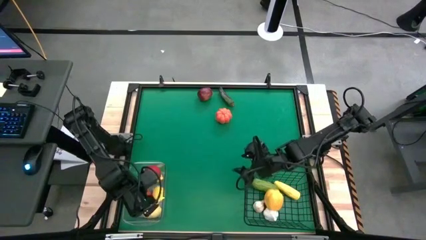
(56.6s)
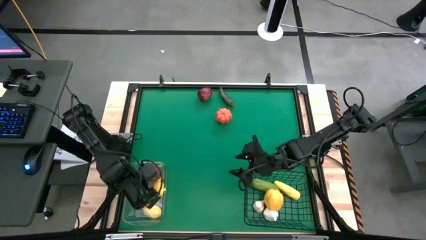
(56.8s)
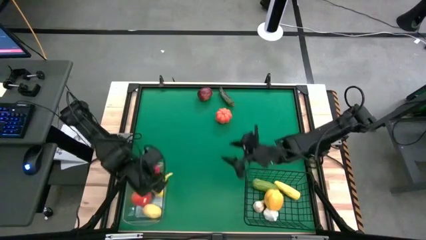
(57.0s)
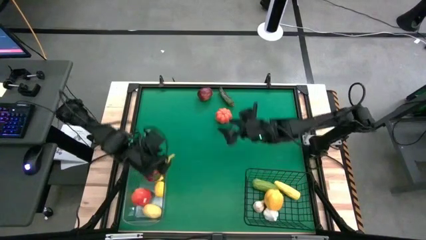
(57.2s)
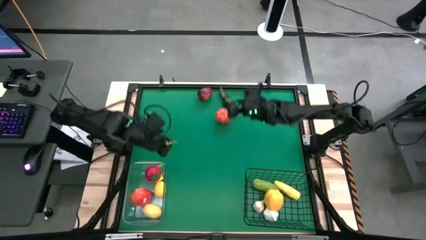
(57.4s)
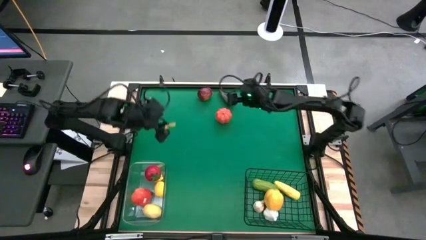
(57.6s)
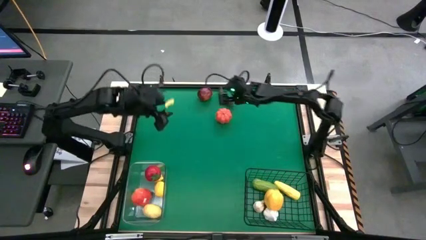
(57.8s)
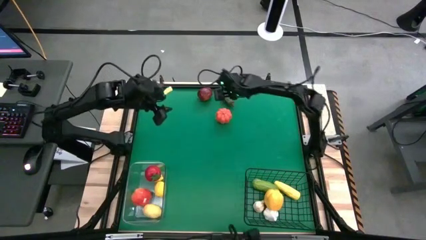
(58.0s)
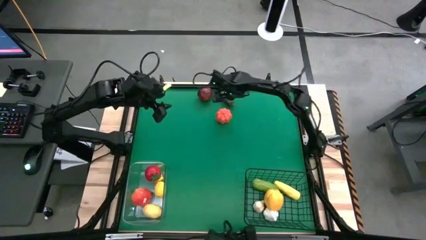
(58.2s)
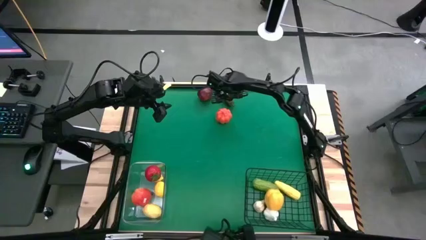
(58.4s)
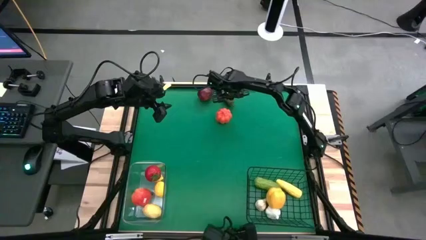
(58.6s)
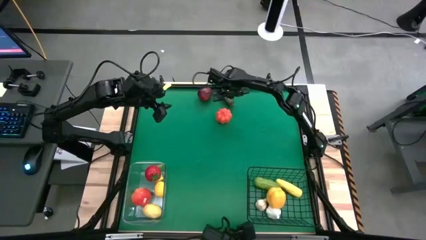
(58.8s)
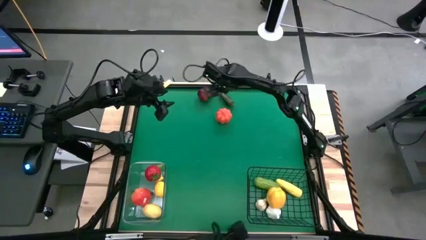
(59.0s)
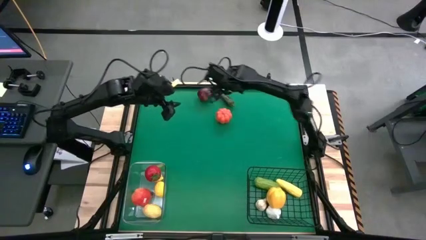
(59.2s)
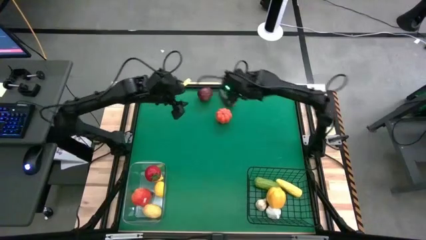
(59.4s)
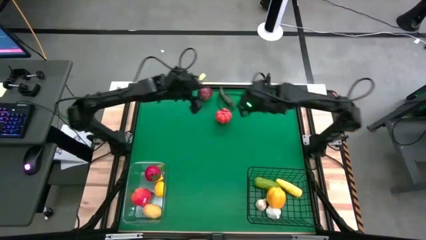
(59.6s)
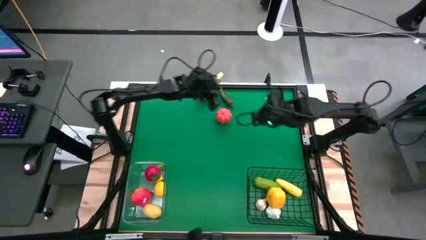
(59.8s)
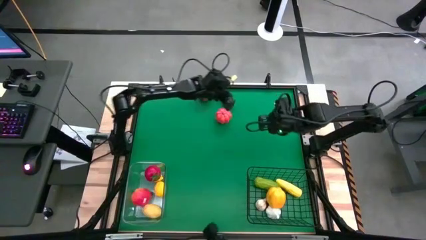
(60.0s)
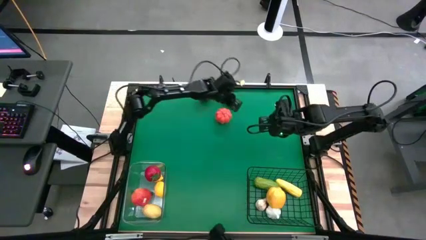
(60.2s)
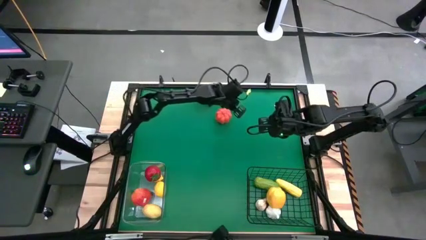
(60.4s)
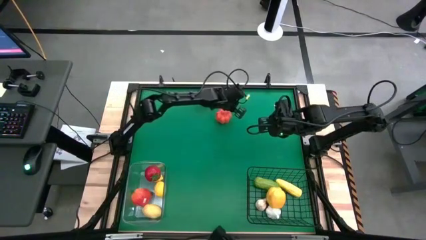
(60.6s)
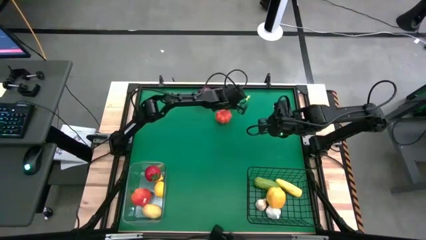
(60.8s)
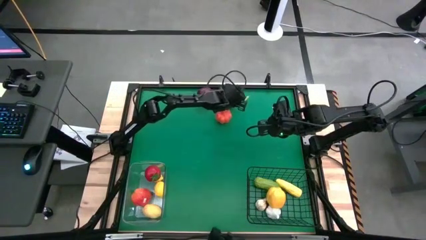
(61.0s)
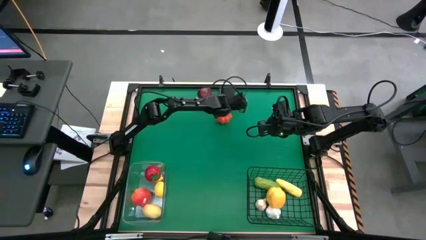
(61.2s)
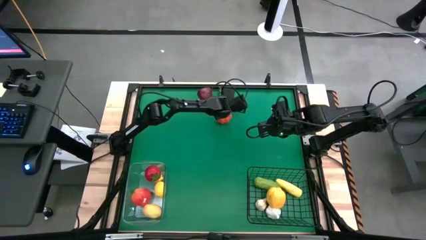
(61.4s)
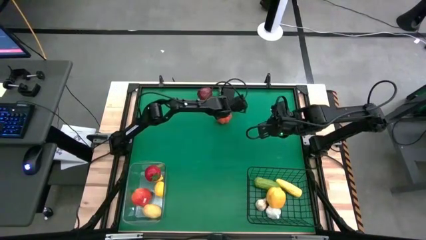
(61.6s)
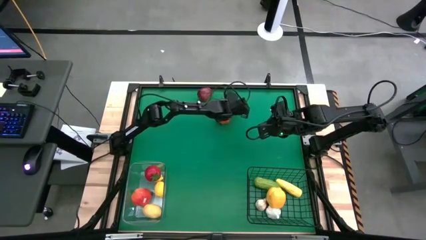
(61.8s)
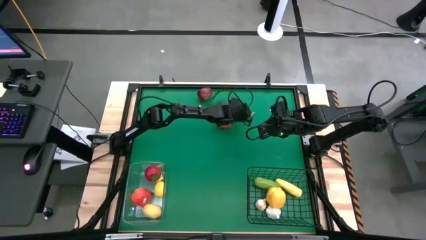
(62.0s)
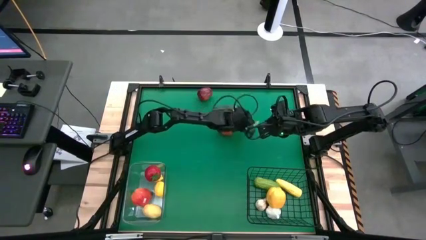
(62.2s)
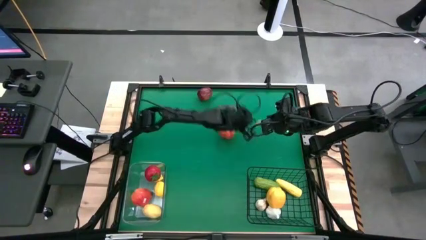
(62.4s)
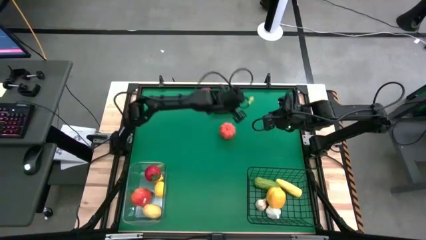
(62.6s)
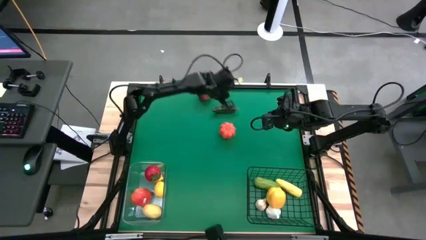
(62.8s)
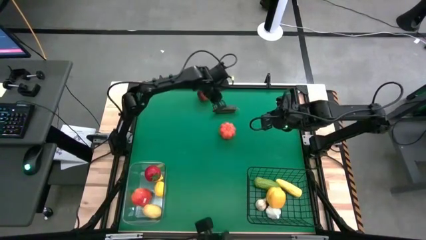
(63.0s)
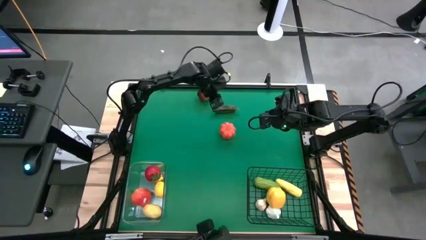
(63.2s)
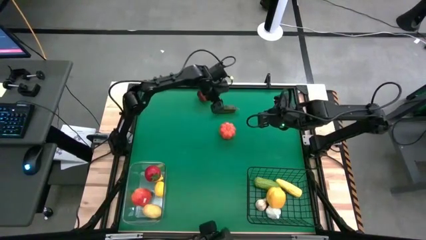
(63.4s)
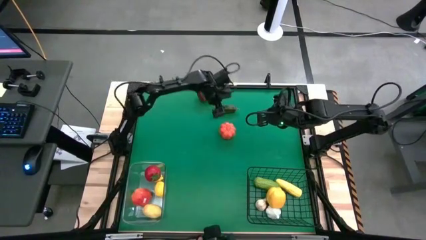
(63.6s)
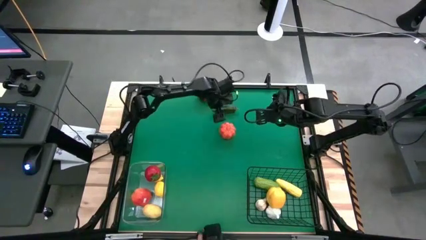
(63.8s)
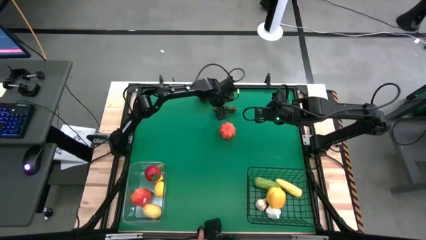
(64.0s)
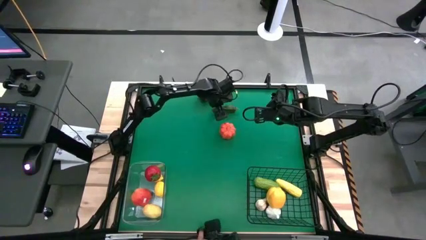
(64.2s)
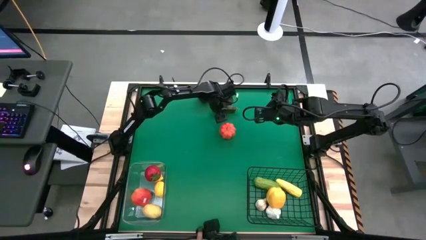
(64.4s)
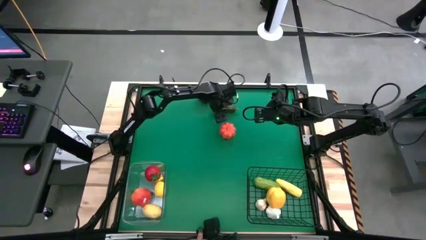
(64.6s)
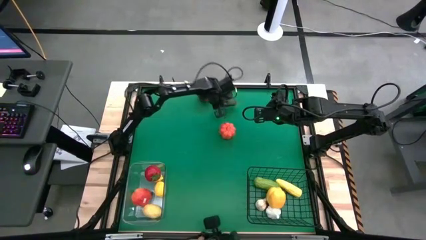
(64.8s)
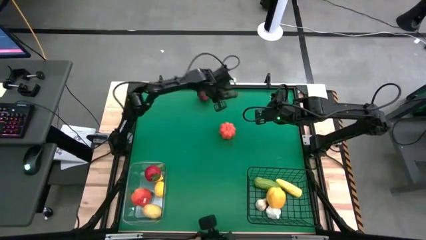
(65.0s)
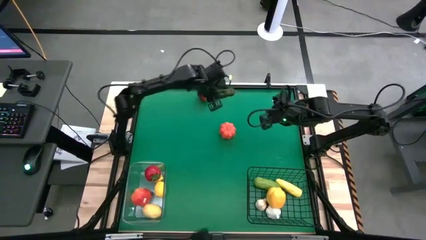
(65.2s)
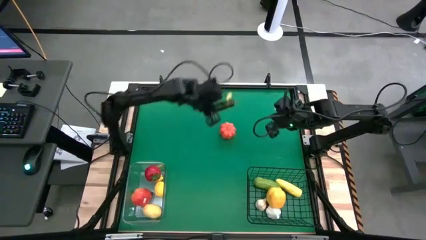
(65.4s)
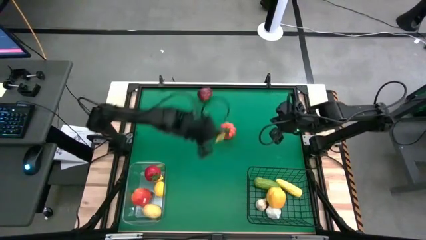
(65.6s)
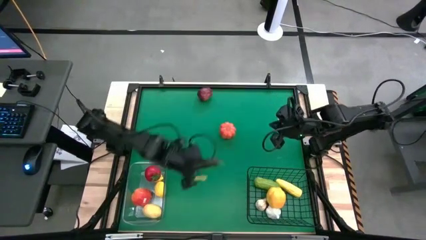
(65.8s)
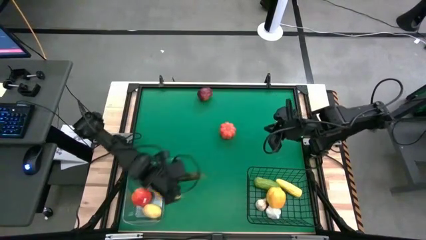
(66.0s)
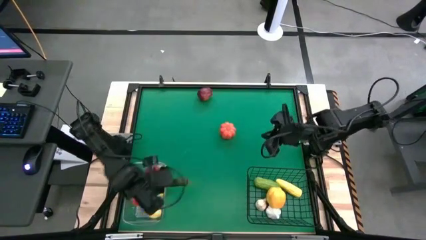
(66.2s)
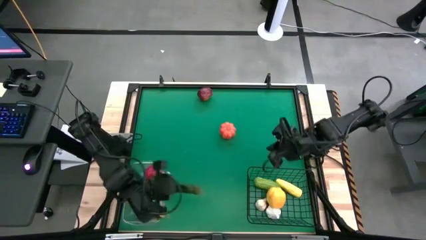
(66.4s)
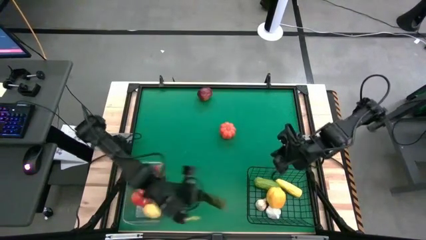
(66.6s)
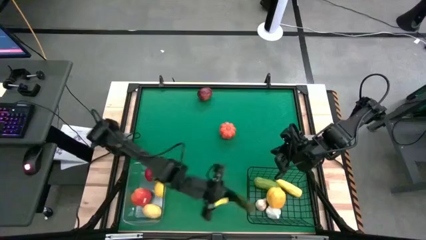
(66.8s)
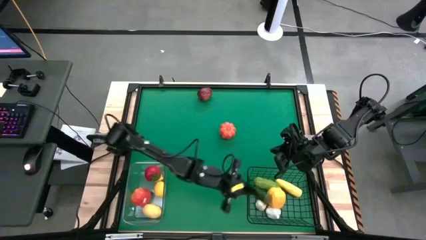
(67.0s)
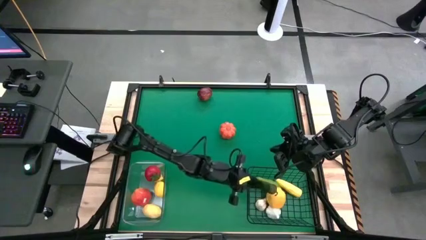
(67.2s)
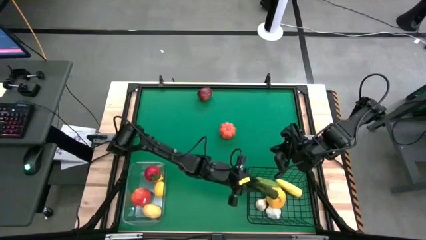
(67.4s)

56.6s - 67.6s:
Task: Sort produce into baskets
Put the green bell pepper into the wire basket

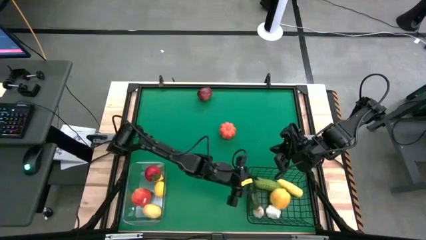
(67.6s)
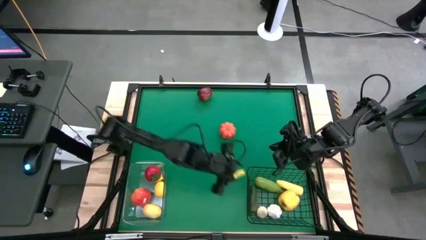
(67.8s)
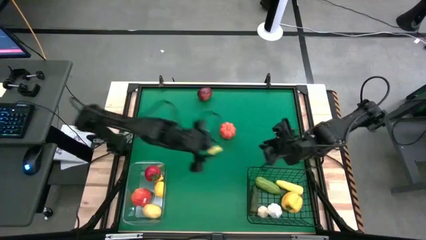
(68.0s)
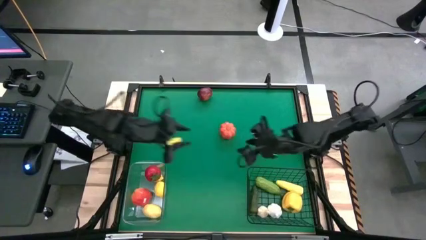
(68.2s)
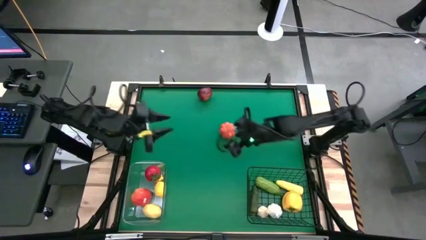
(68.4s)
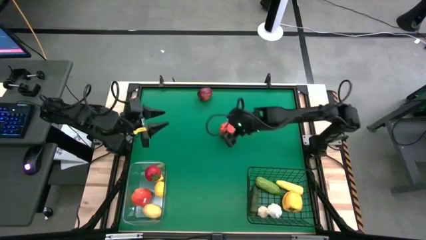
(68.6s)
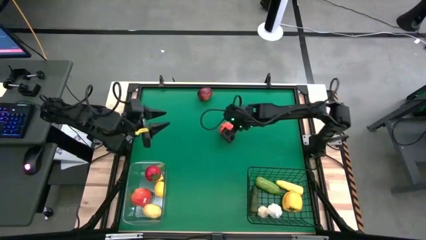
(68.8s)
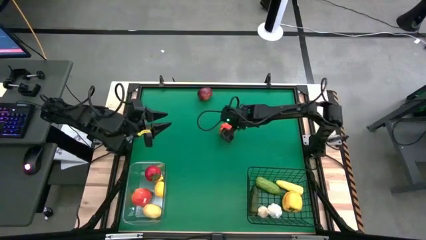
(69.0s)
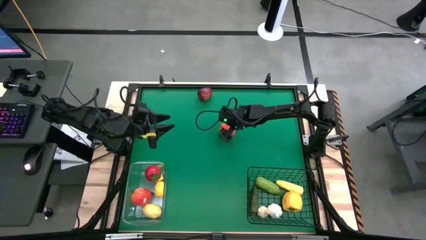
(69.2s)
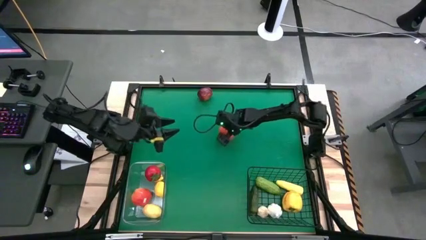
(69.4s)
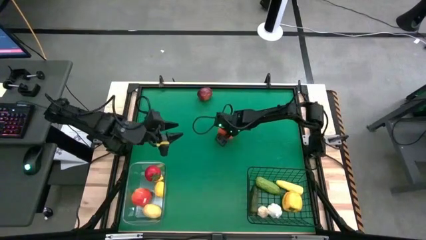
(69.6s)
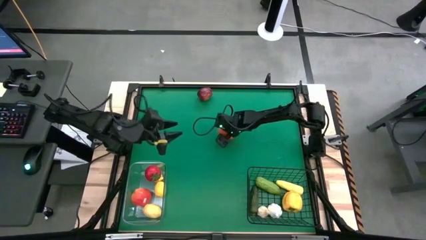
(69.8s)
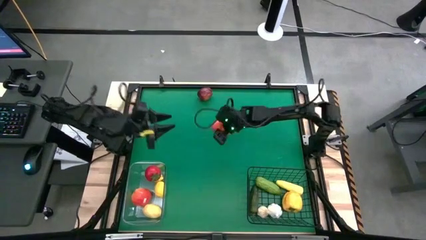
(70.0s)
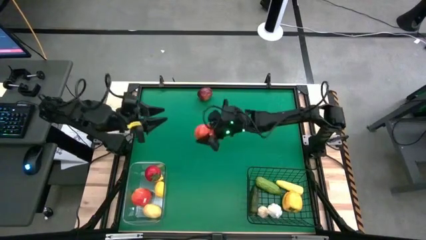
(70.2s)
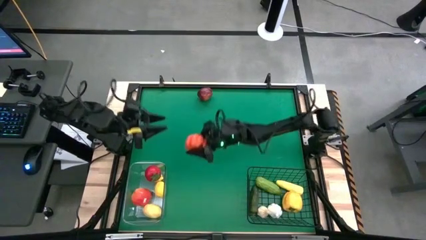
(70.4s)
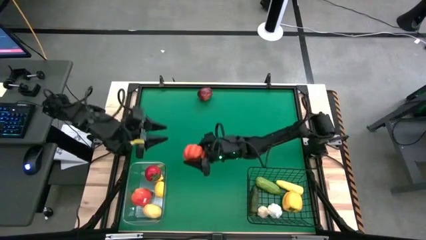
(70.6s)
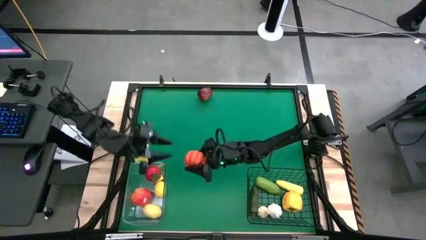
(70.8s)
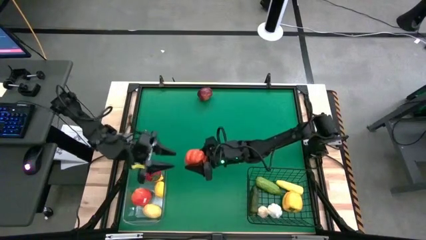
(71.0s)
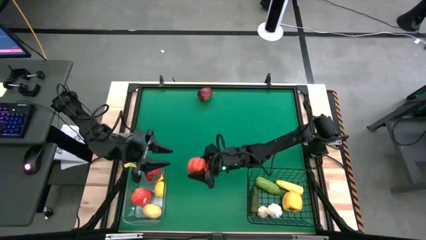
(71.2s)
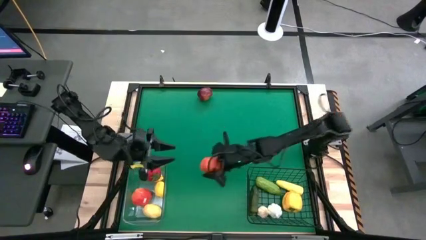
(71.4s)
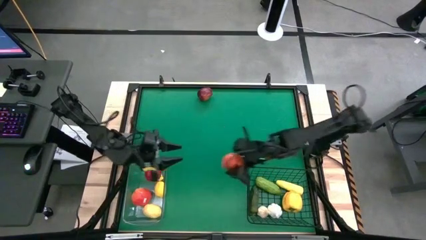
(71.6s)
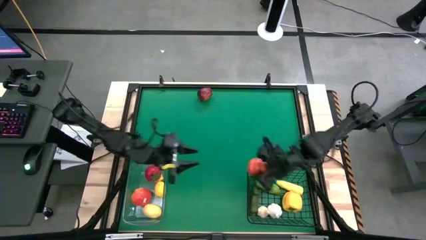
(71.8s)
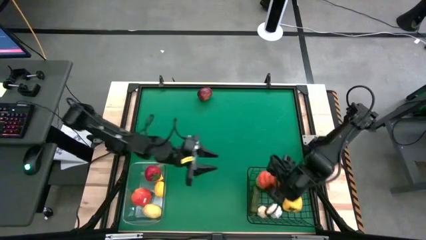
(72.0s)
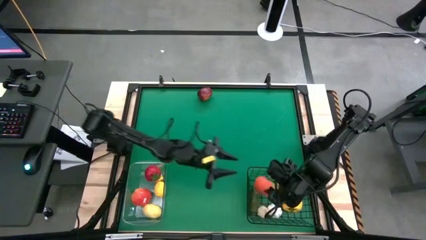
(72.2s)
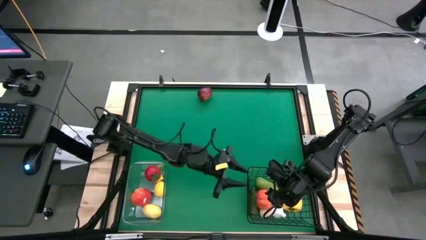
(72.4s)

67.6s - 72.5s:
Put the pumpkin into the wire basket
